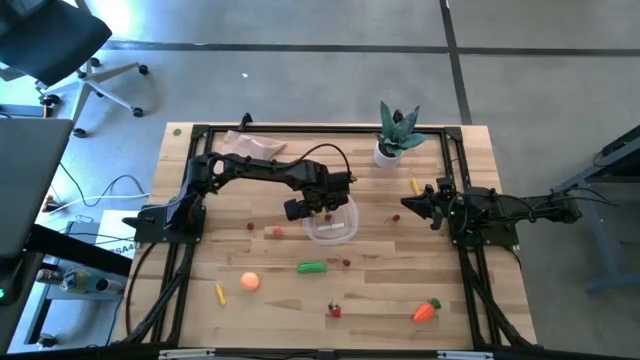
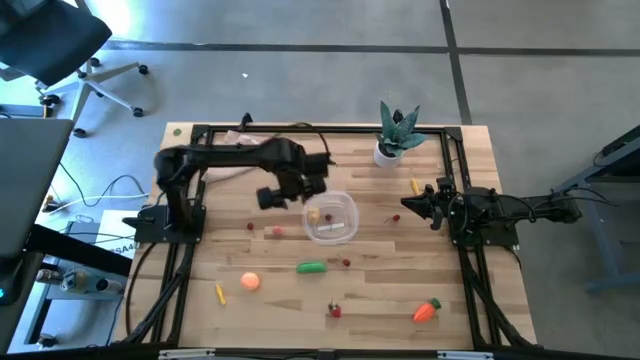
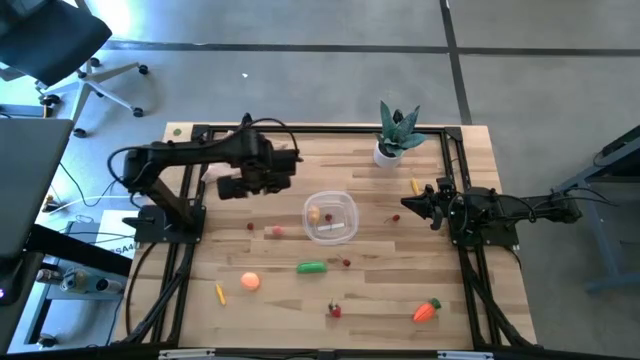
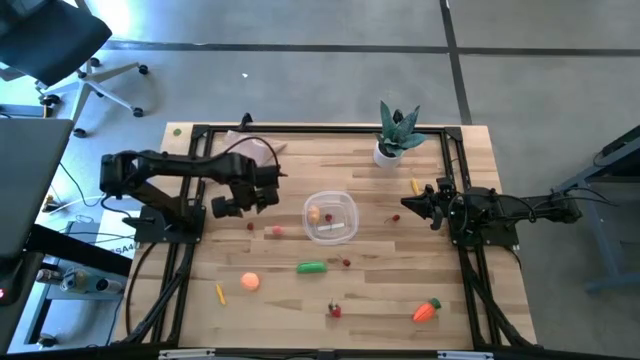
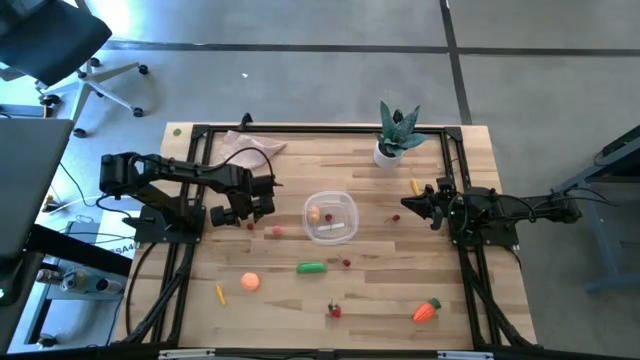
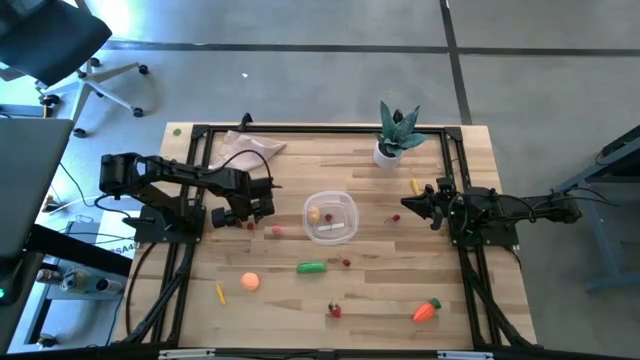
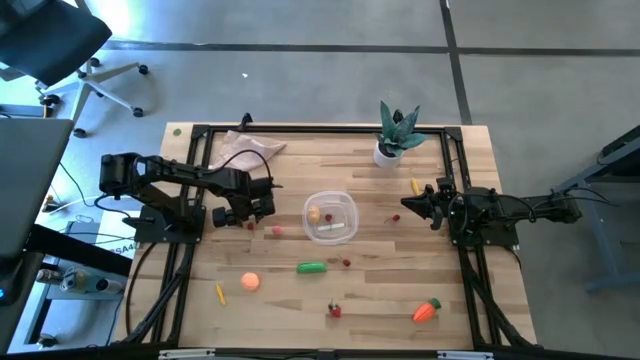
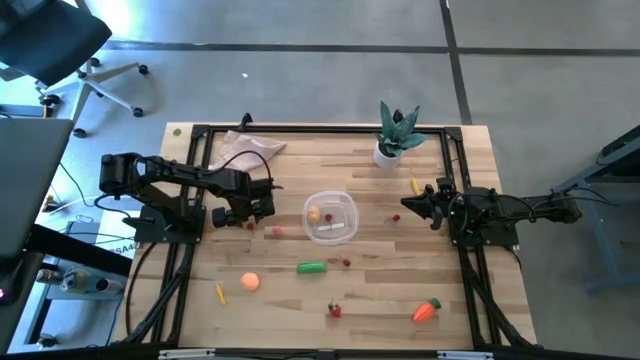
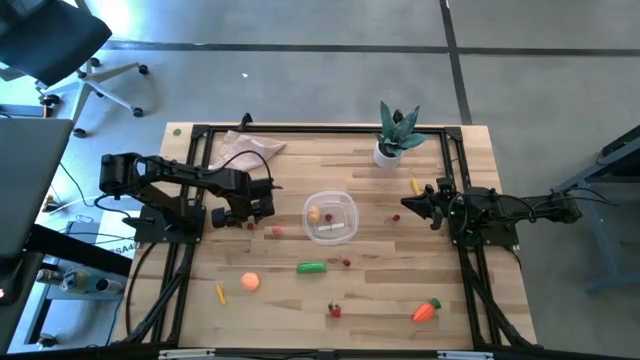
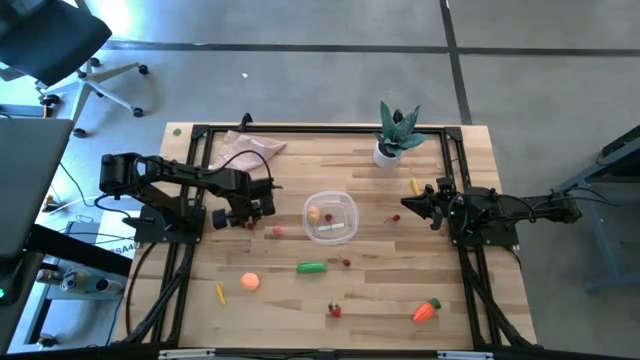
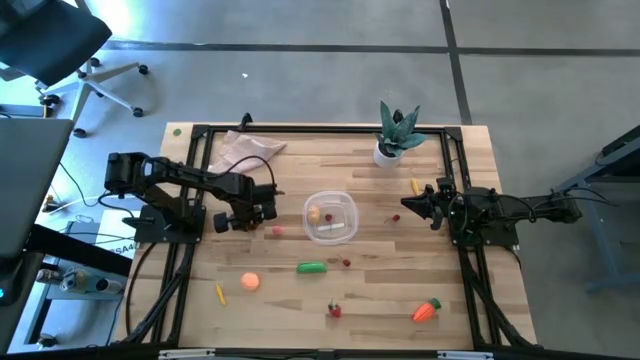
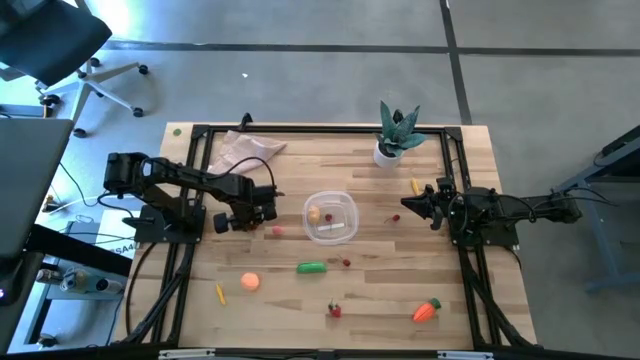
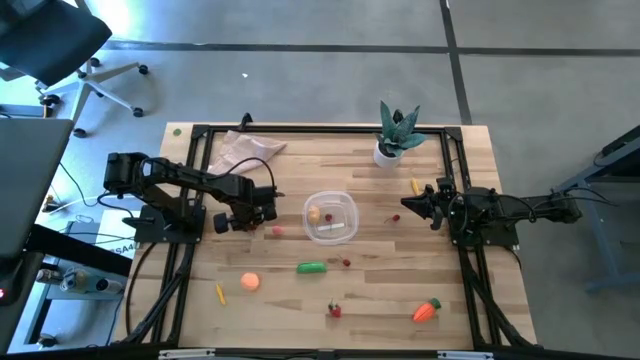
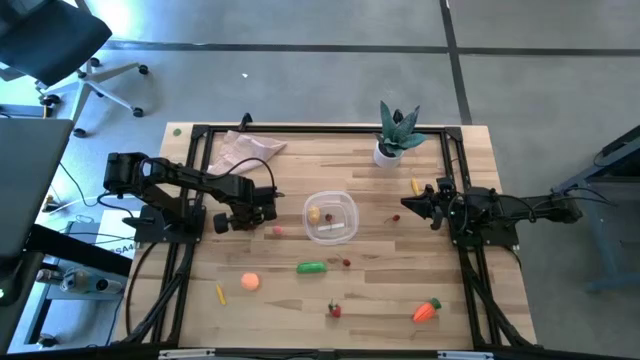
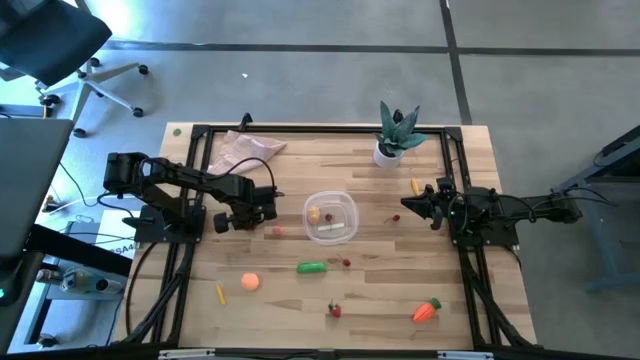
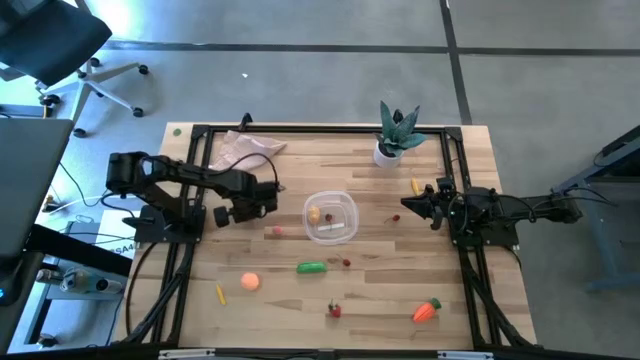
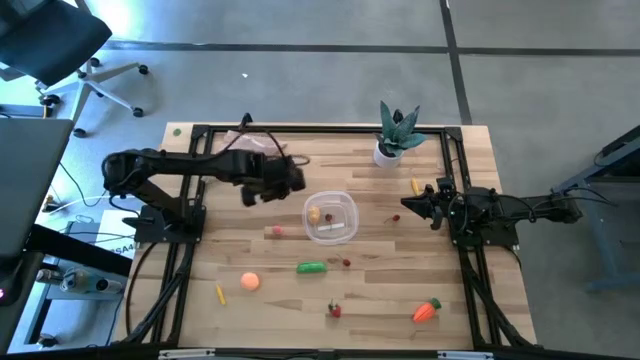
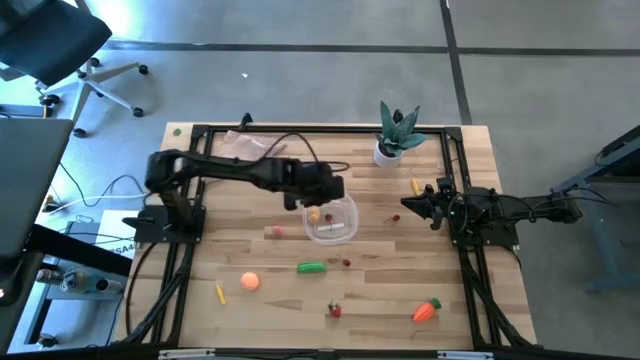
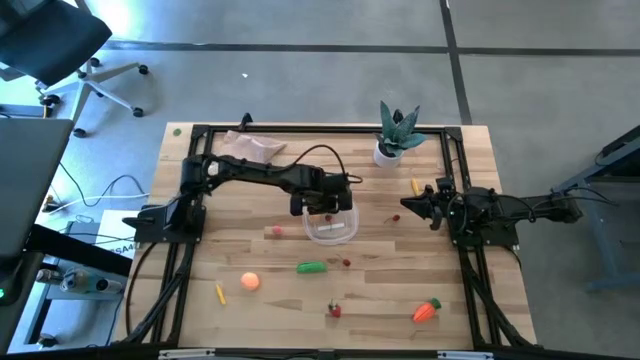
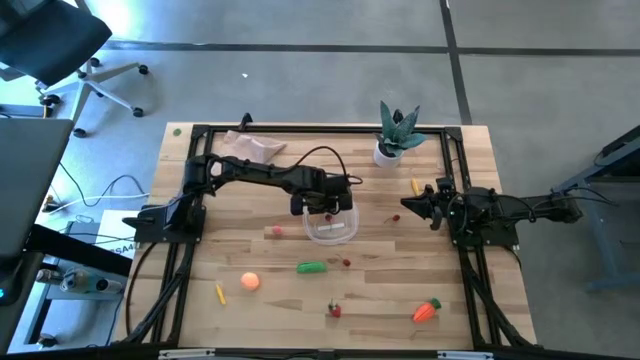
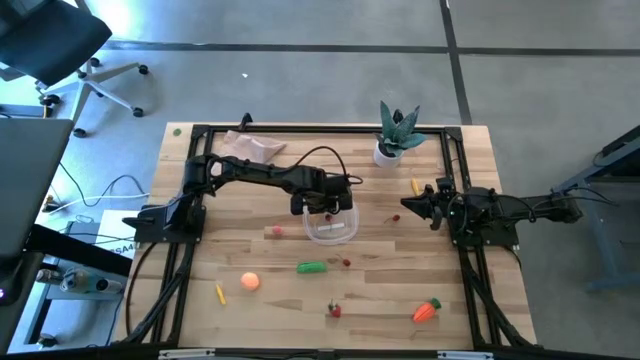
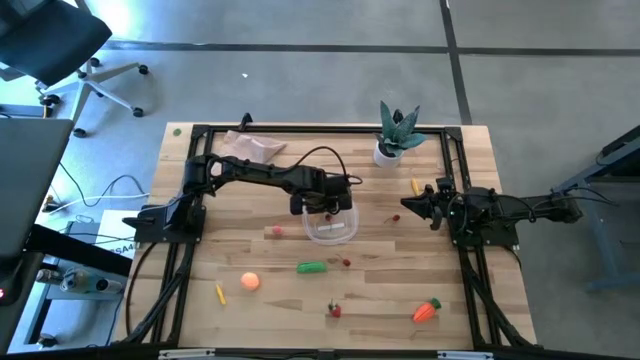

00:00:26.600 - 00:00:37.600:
Task: Pick and placing Produce into tupperware
Put the red cherry into the transparent bin

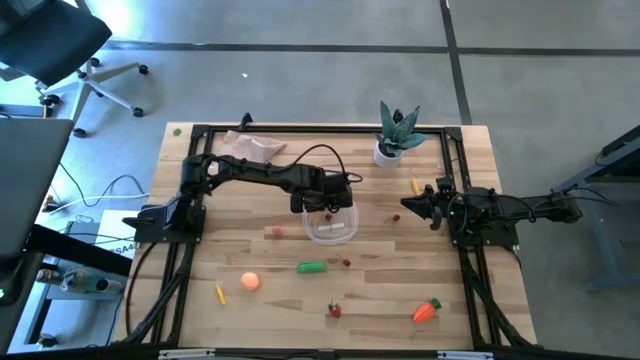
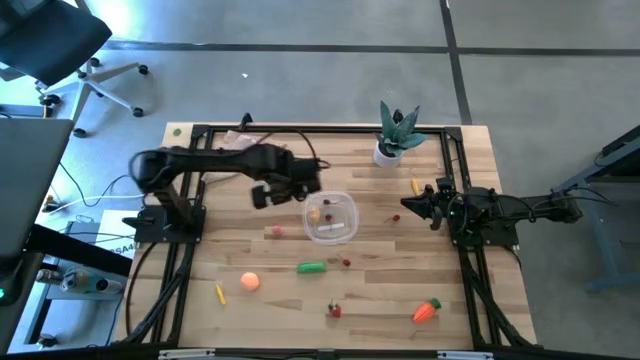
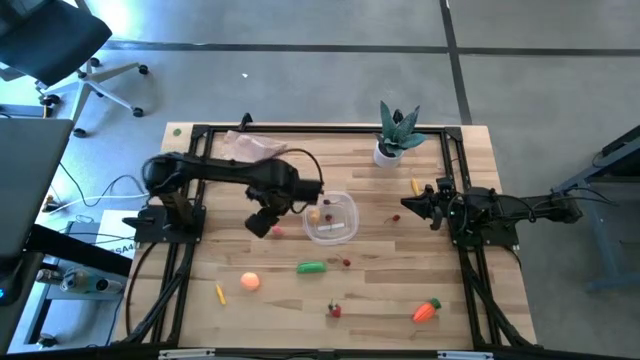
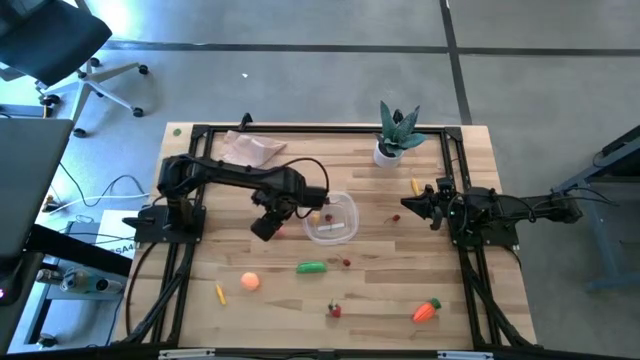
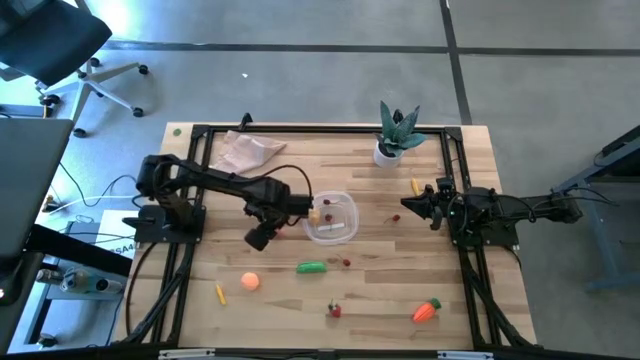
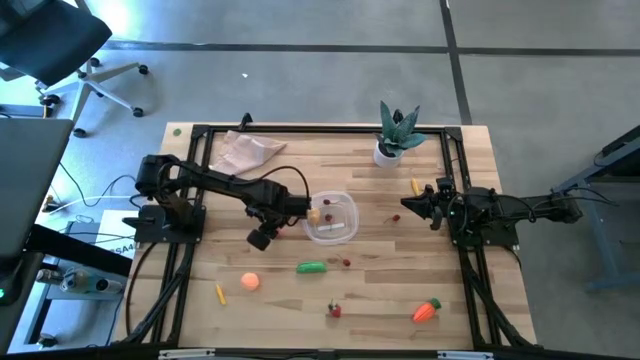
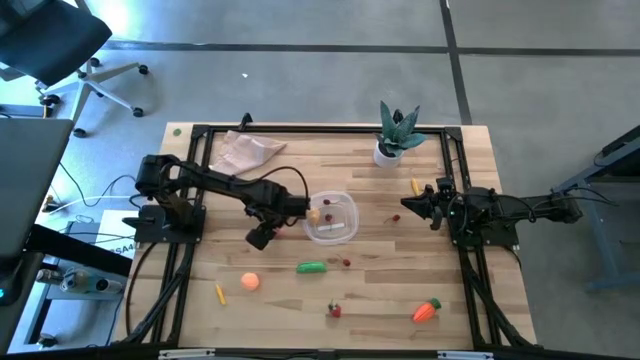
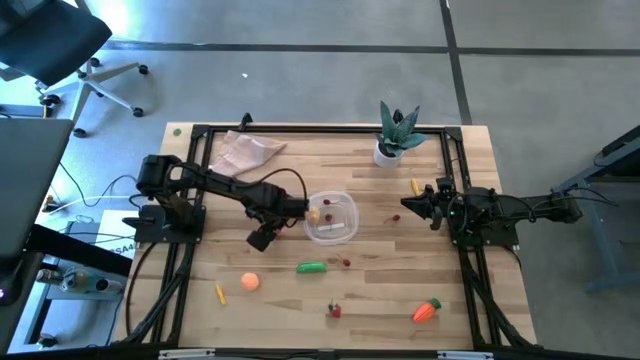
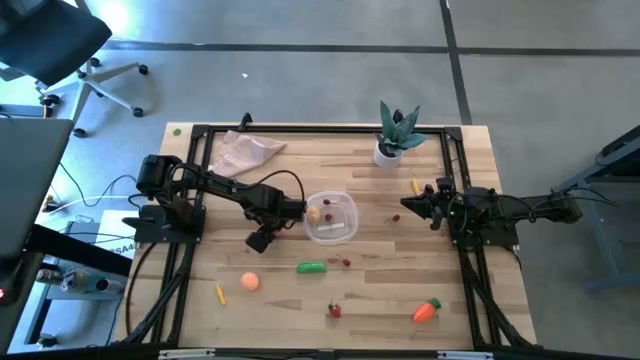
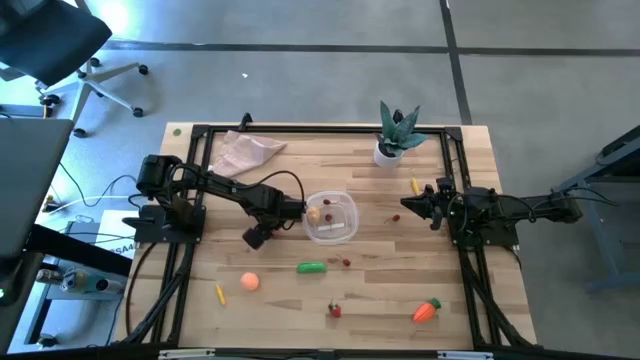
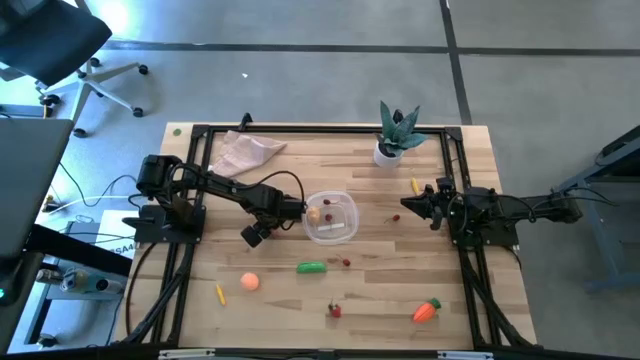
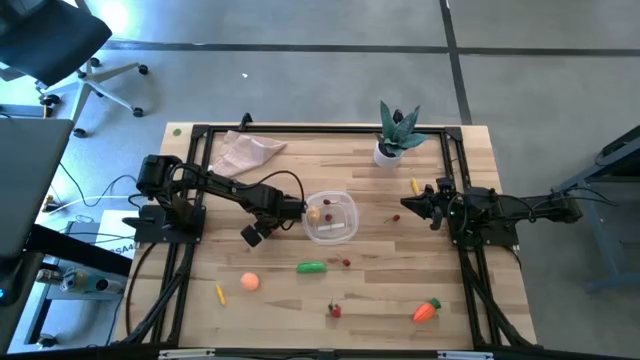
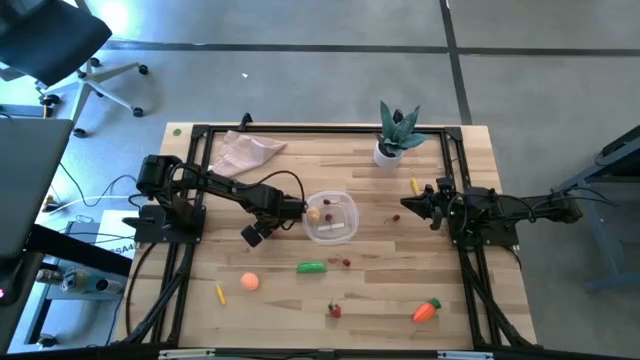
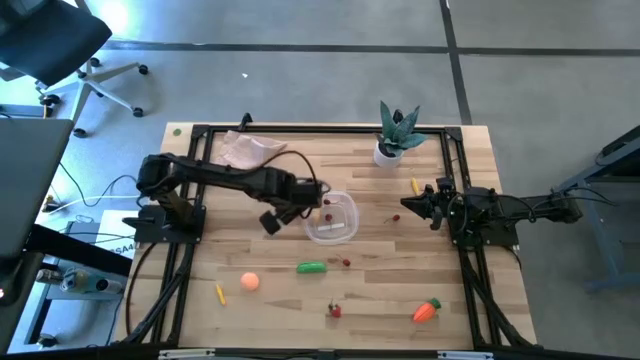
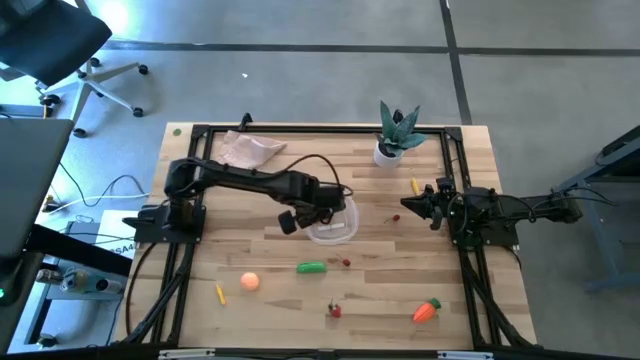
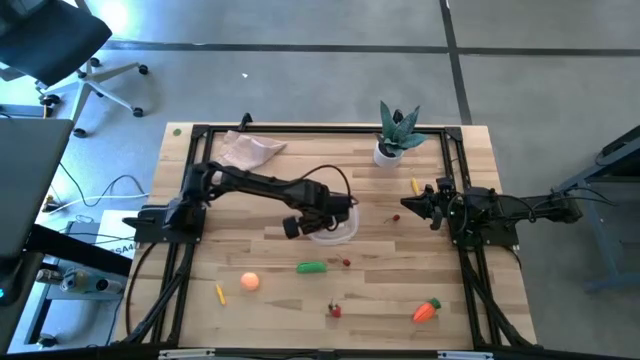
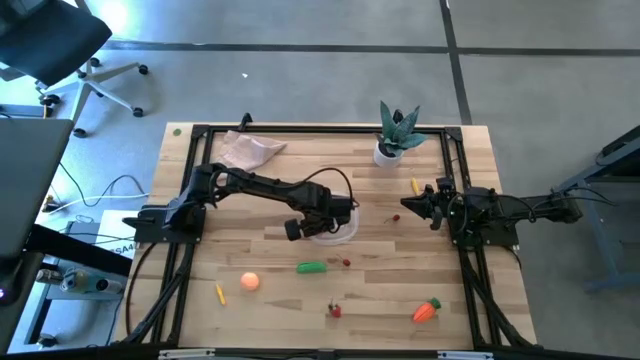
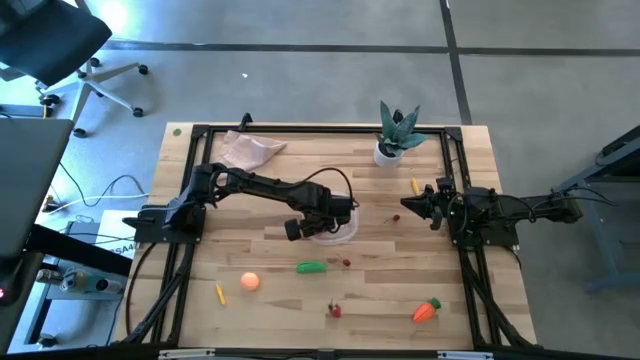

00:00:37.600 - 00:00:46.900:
Put the pink peach into the transparent bin

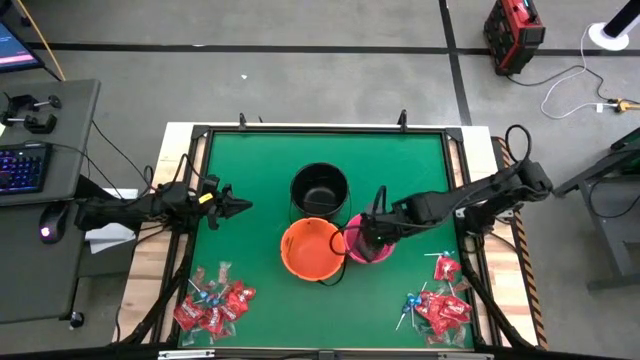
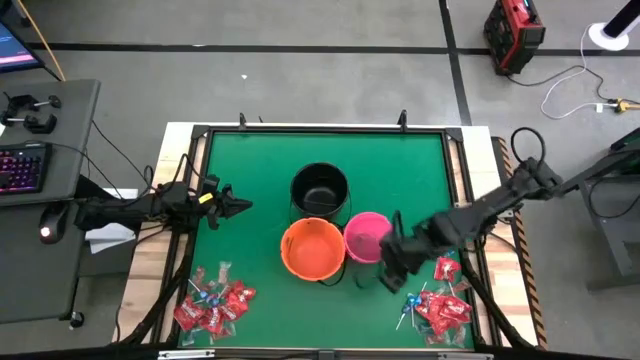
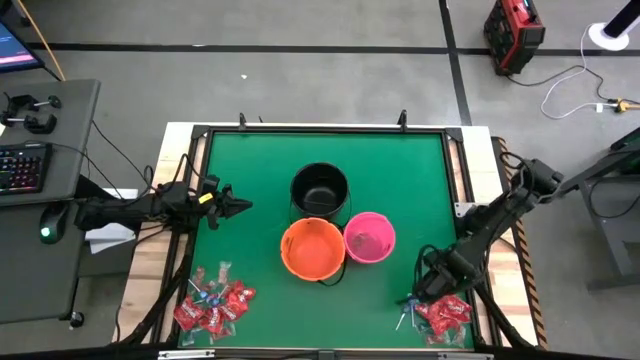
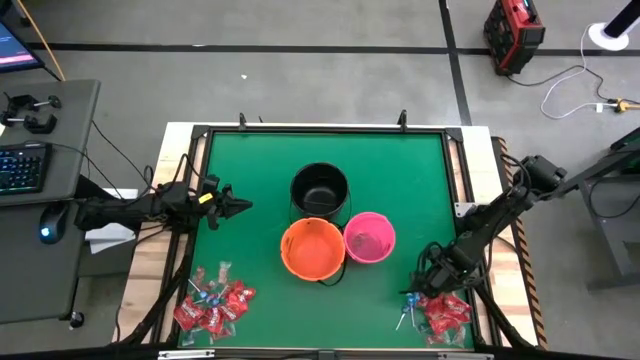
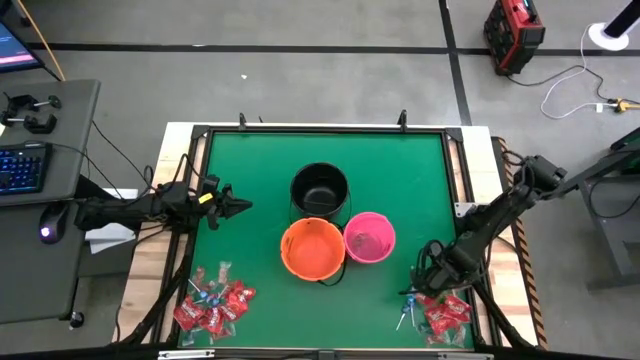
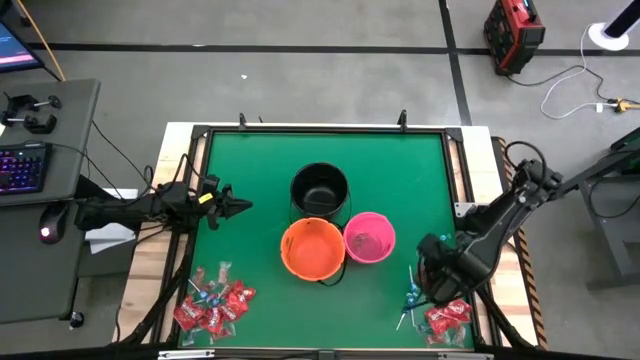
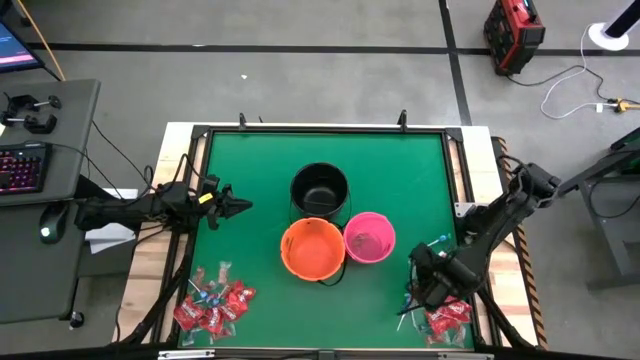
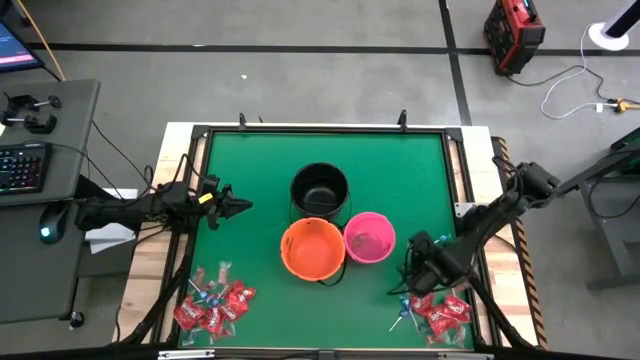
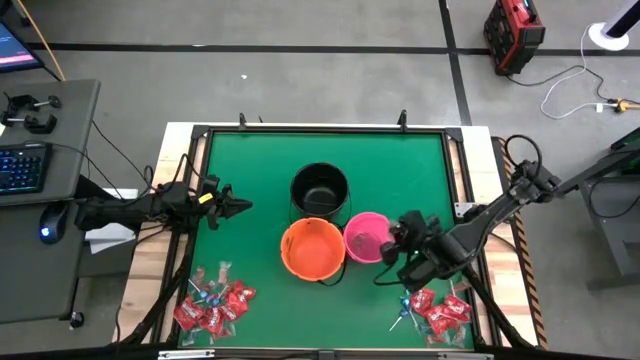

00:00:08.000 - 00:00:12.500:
Task: Sort candy by brand, put in halloween buckets
Put the green gummy into the pink bucket
